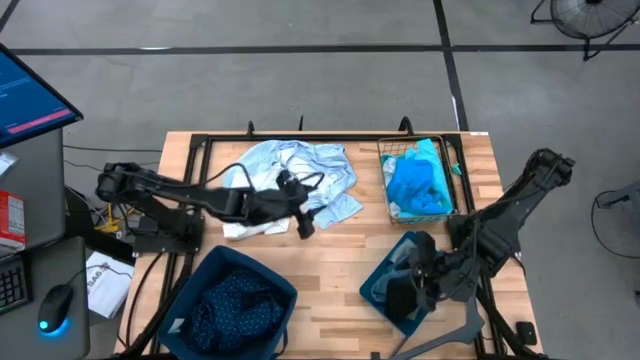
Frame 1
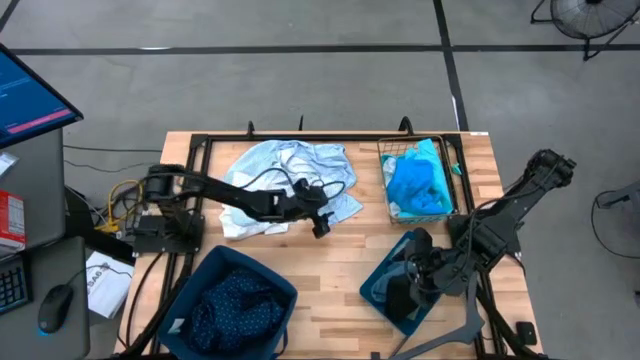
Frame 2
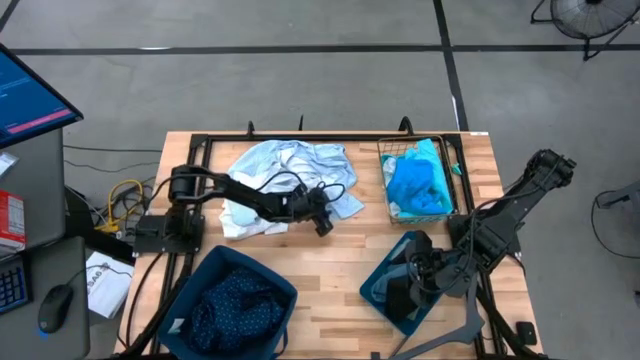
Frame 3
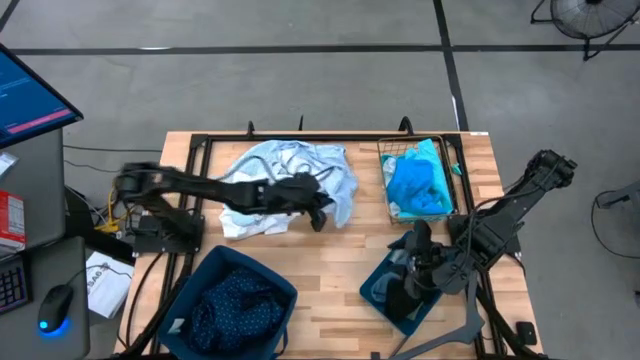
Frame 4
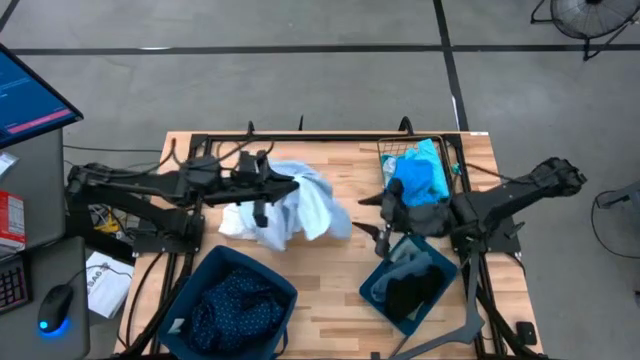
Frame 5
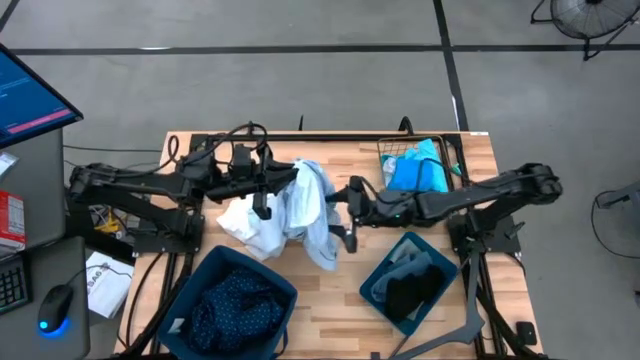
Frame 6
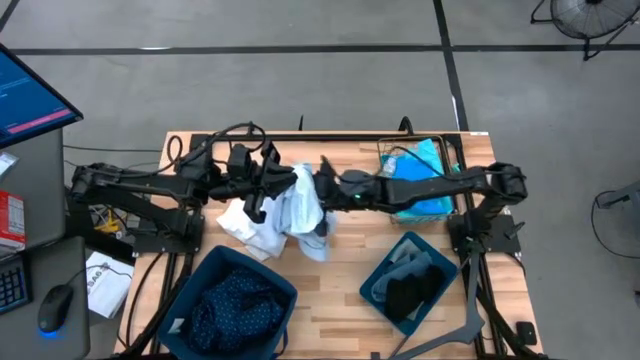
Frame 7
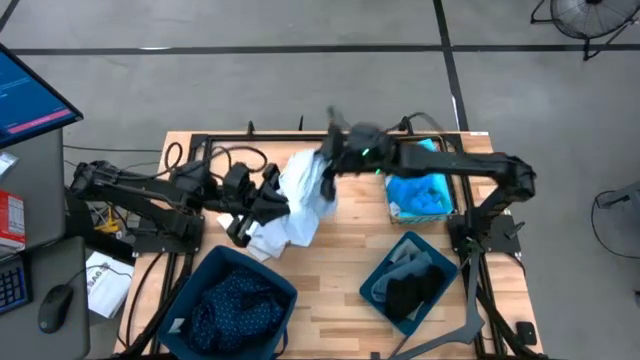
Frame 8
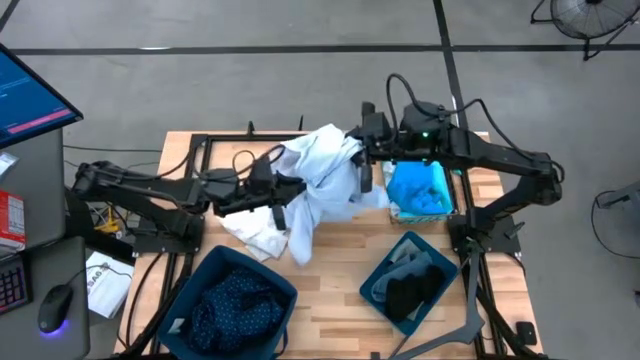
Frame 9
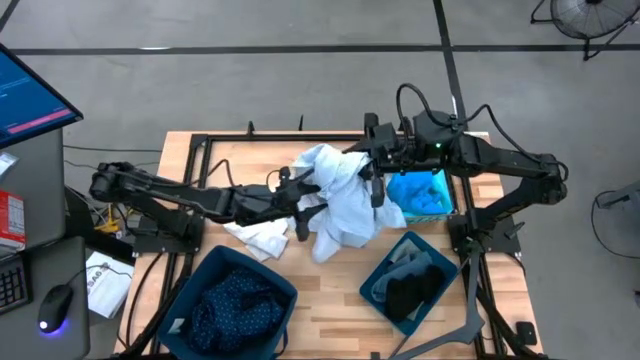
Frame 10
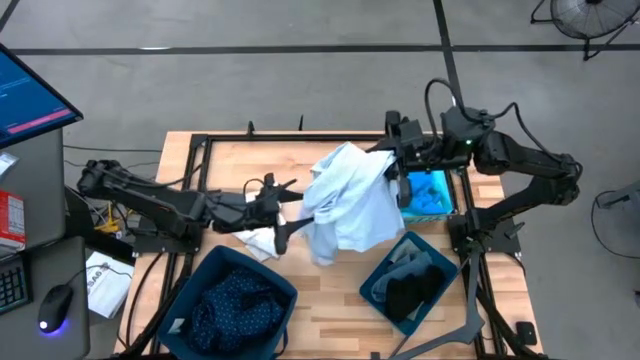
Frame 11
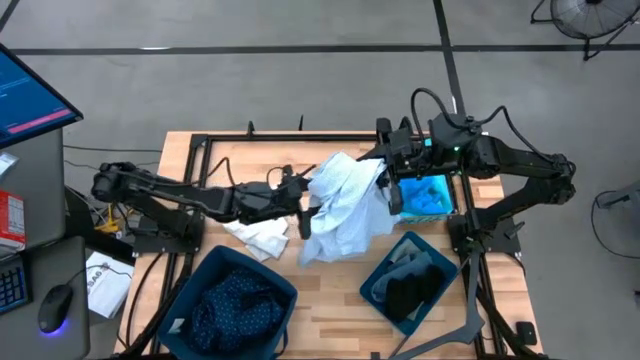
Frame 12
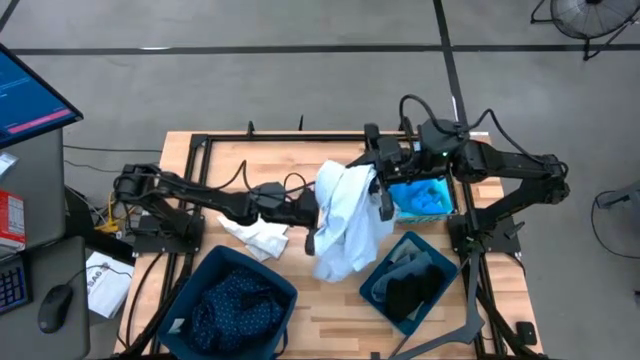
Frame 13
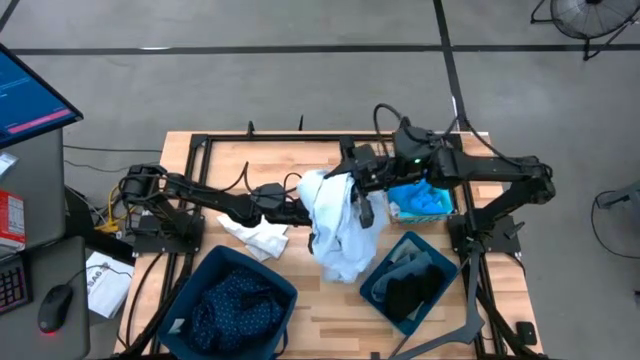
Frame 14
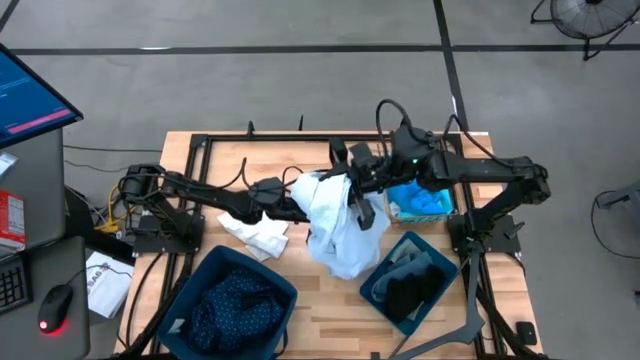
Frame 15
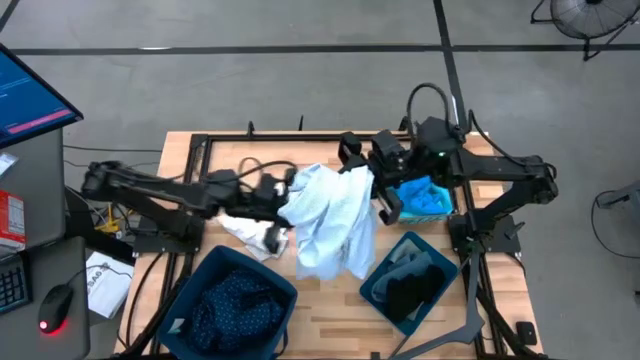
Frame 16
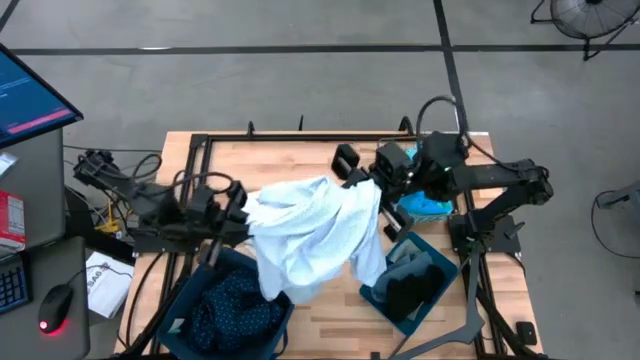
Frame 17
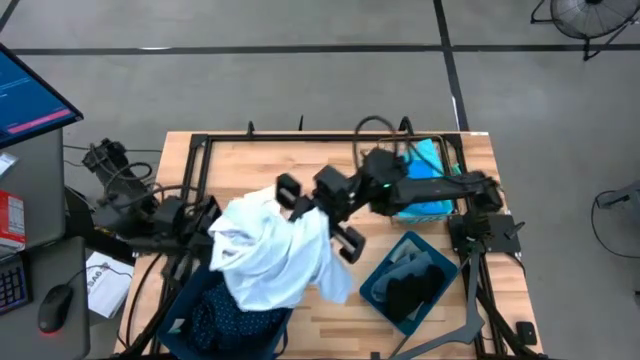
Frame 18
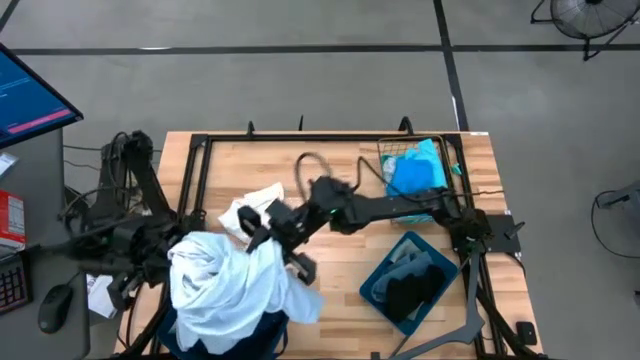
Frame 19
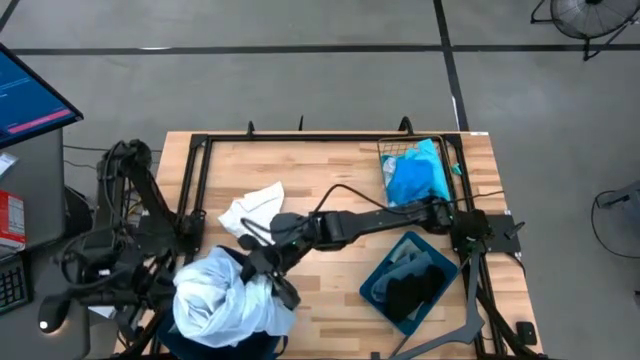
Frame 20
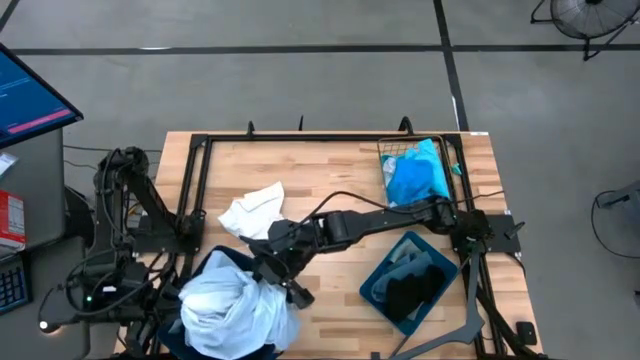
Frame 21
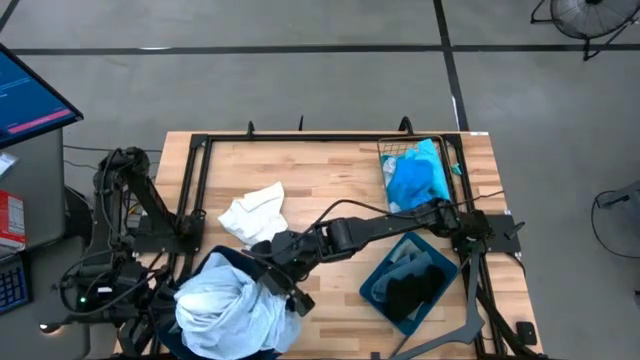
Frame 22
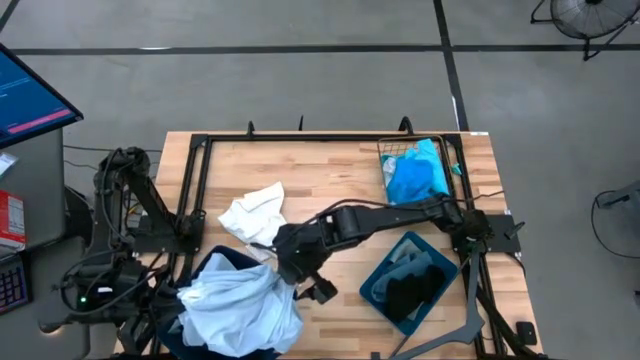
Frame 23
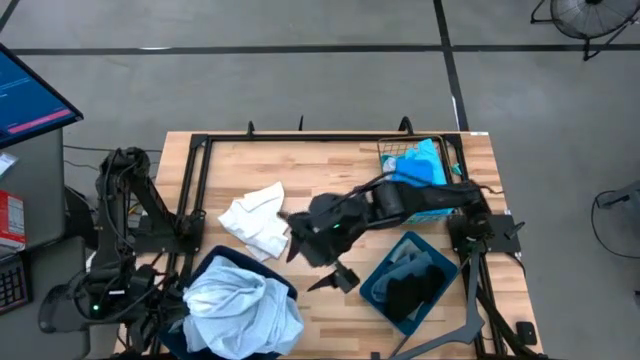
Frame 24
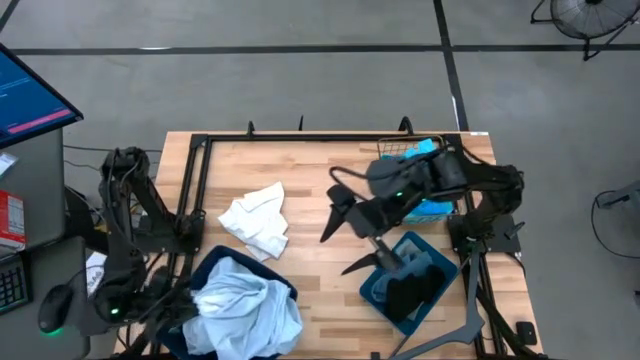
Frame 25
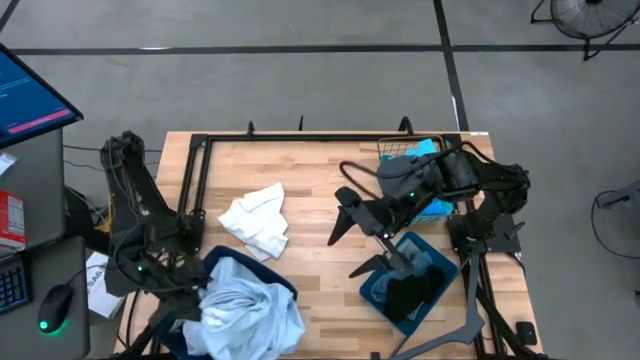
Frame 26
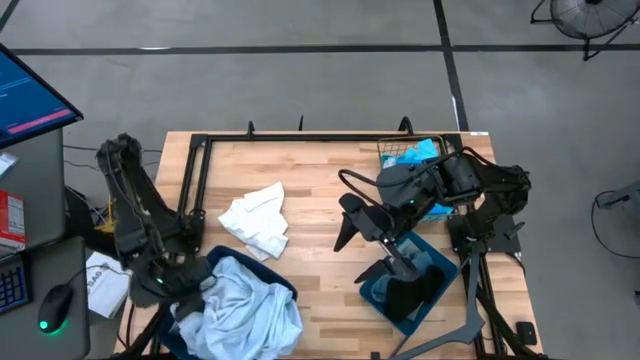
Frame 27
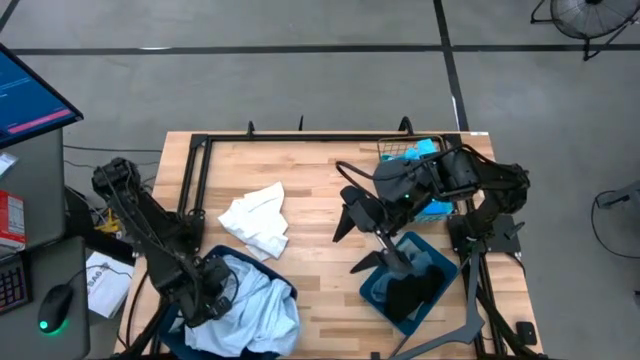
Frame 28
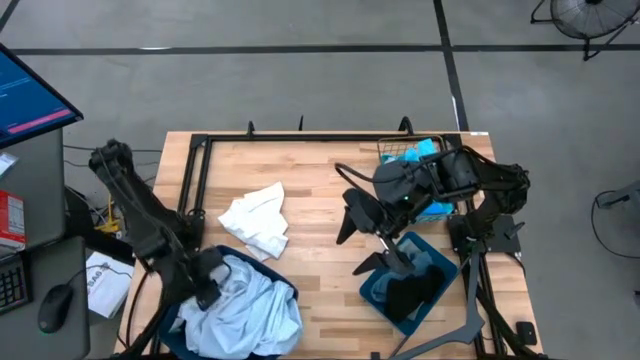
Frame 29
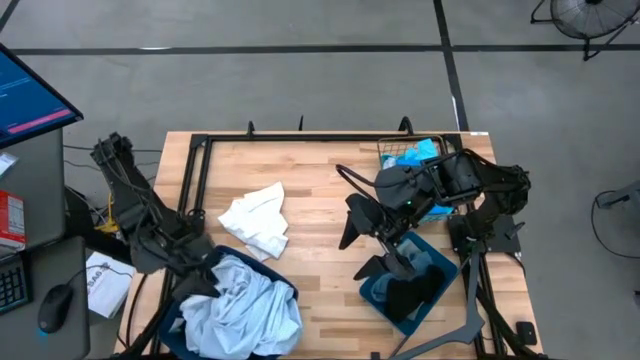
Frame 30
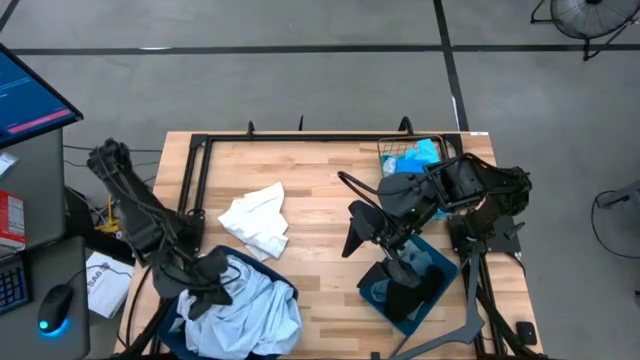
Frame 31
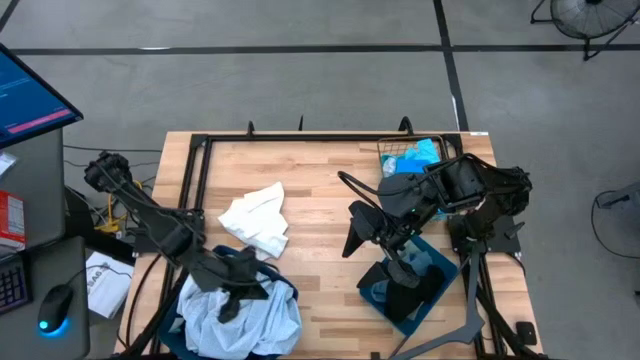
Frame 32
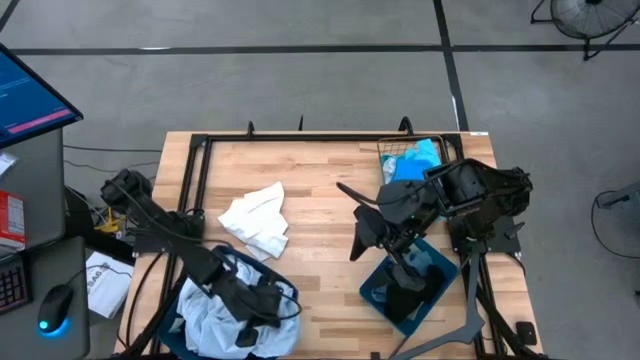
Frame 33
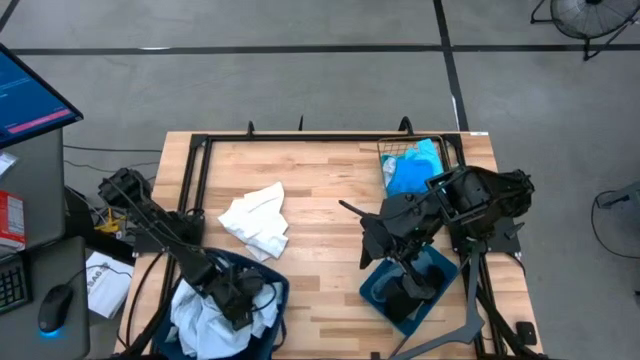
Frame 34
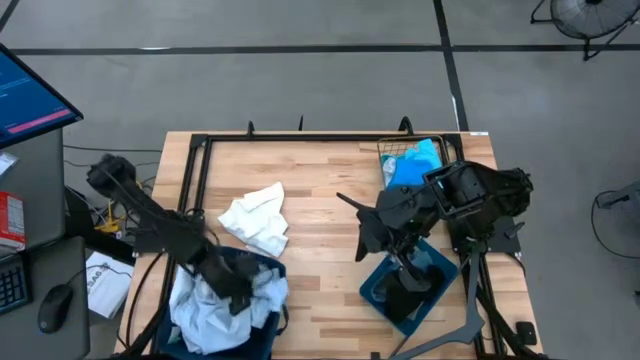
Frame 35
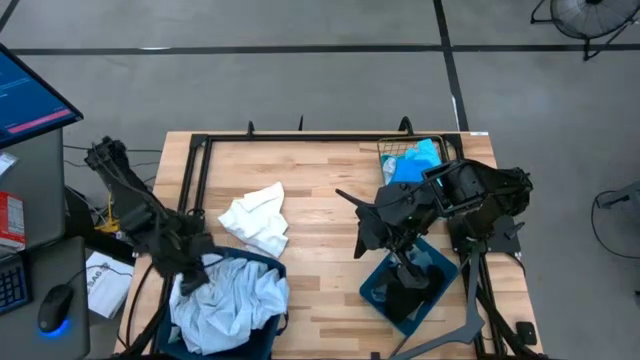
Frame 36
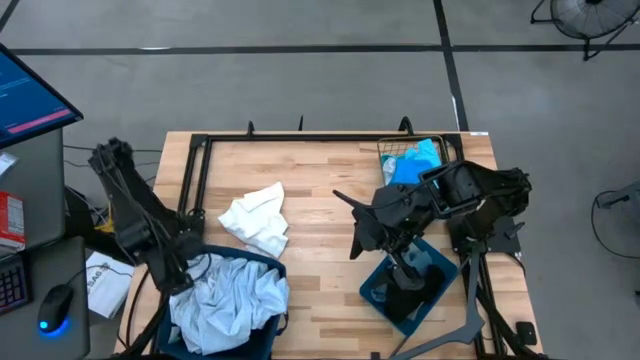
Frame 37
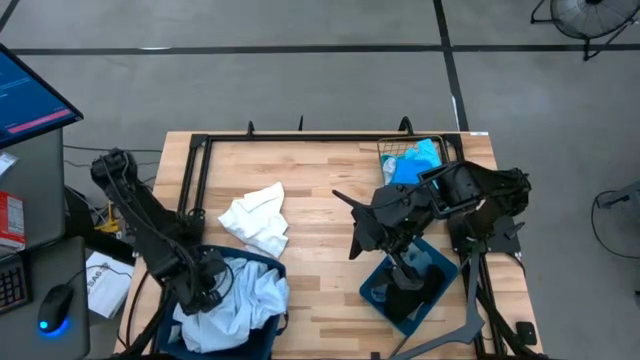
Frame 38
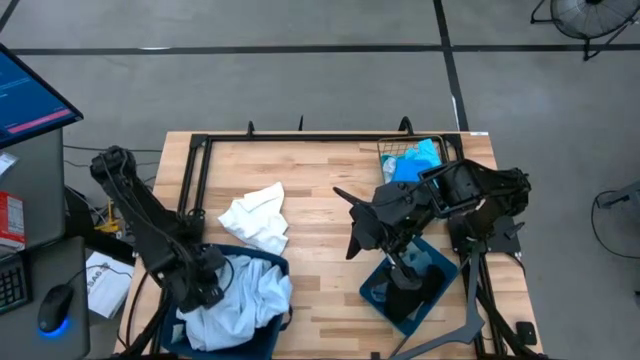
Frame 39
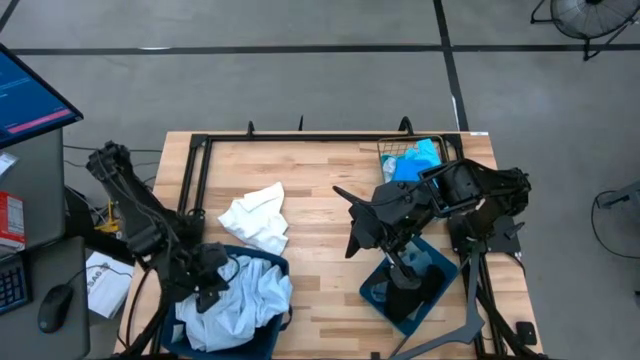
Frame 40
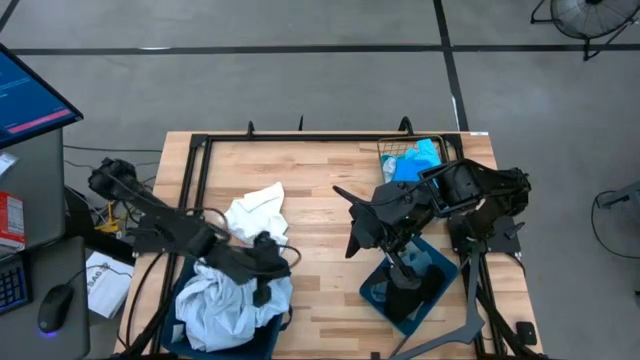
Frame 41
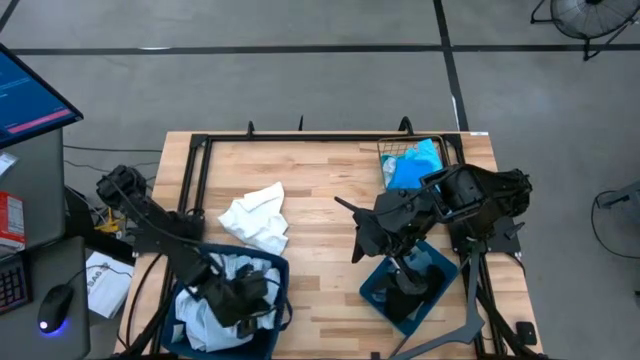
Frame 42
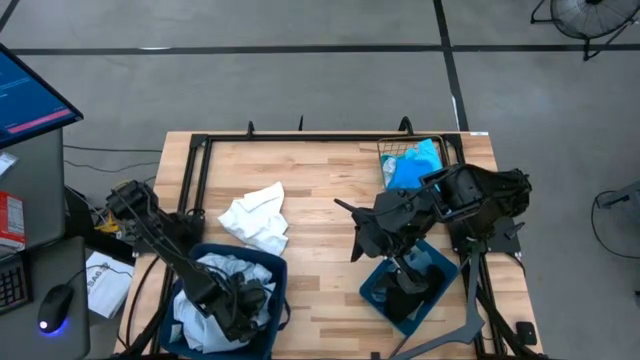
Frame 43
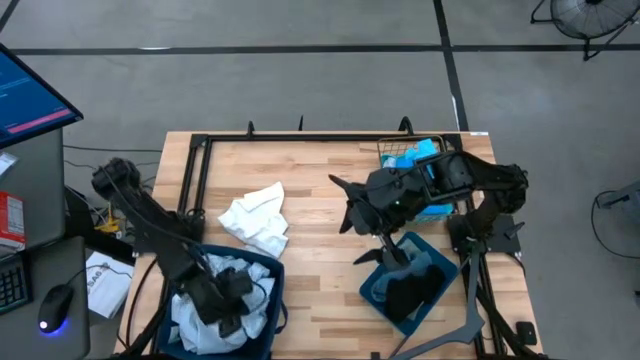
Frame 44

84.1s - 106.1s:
Task: Pick & Place Cloths
Put the white shirt into the laundry organizer
